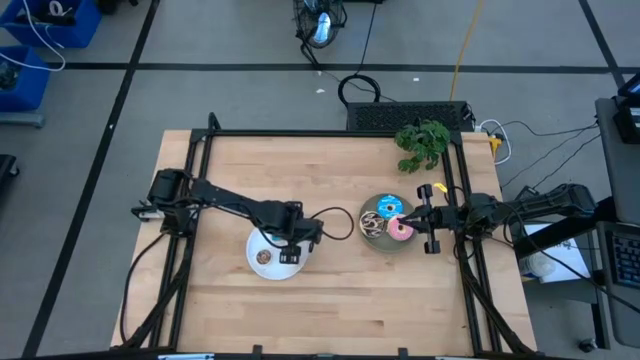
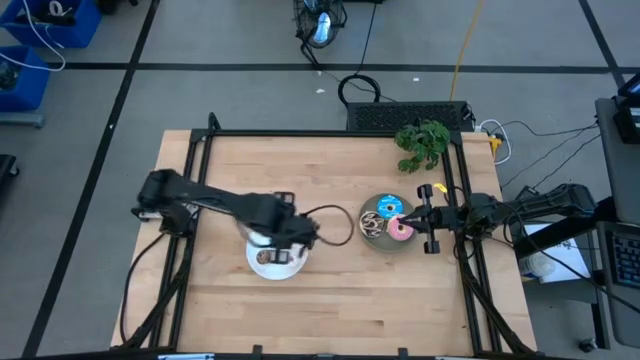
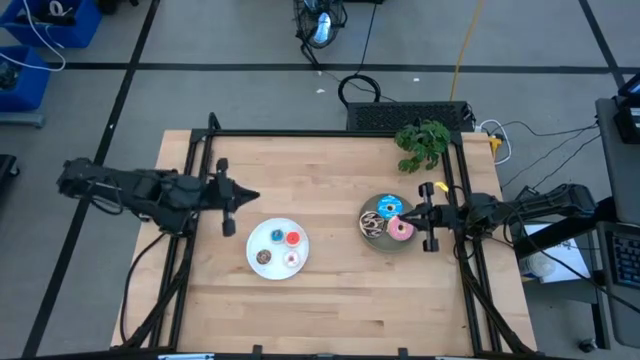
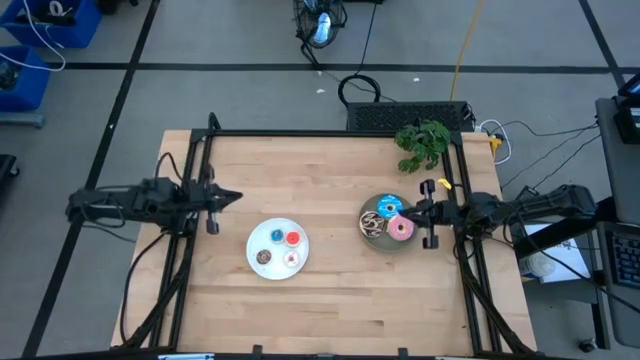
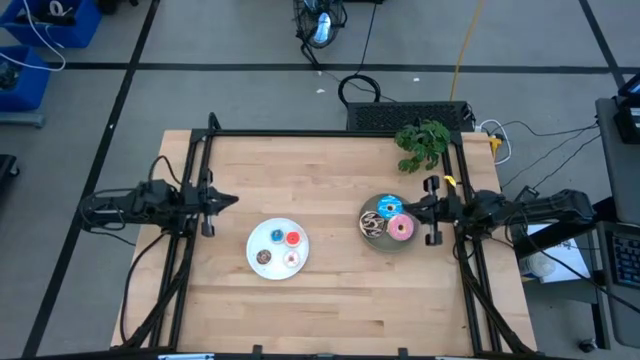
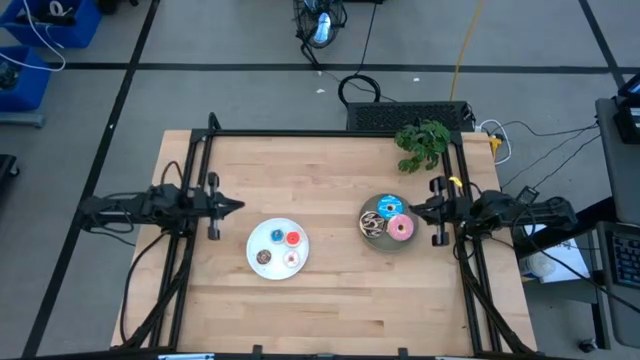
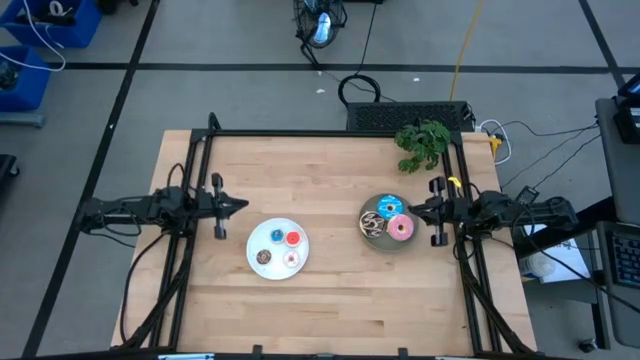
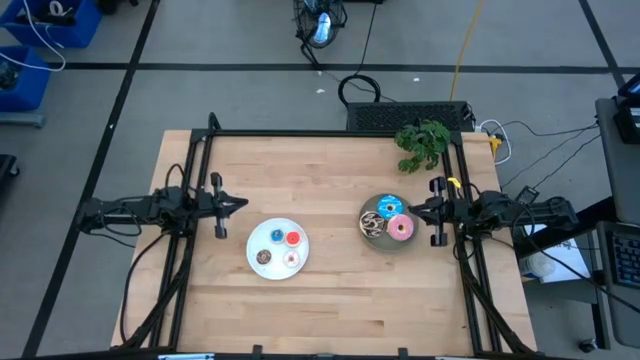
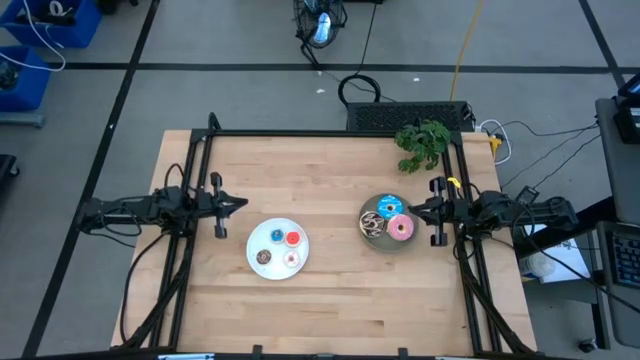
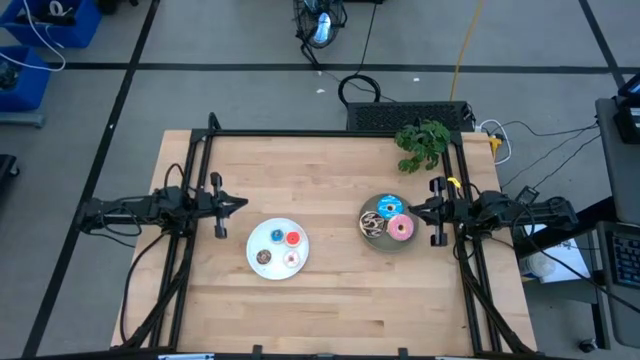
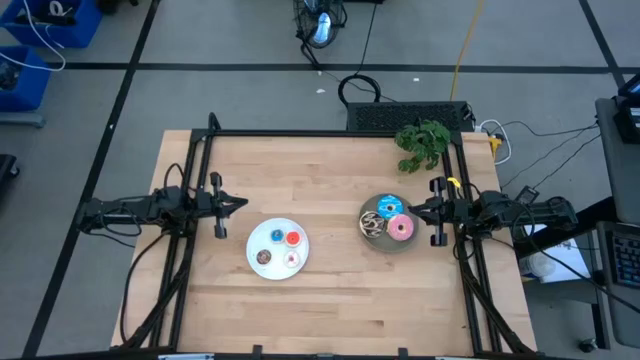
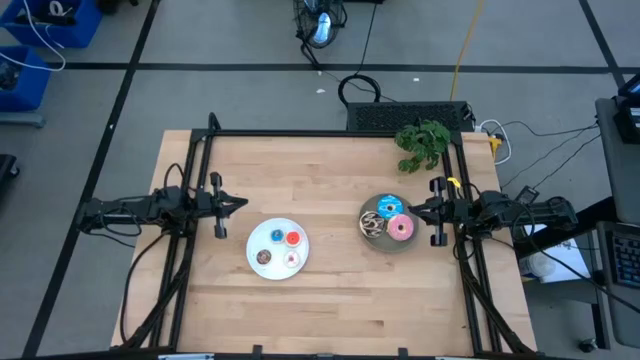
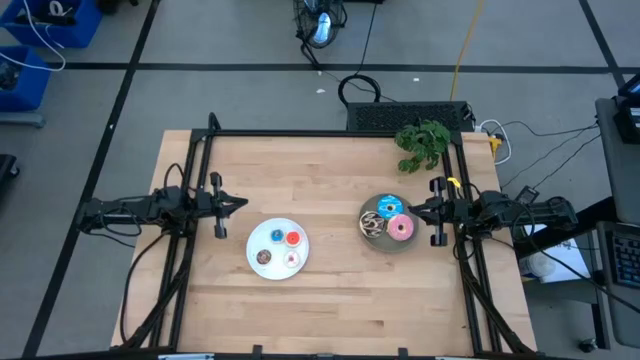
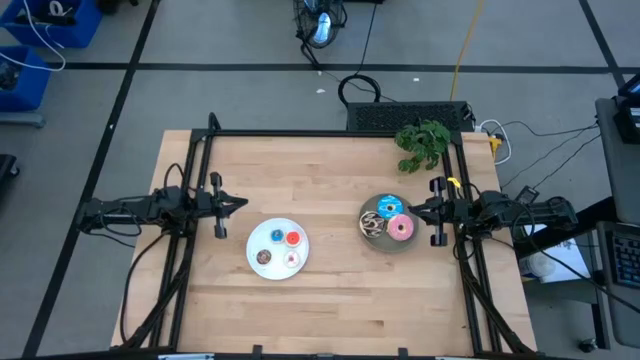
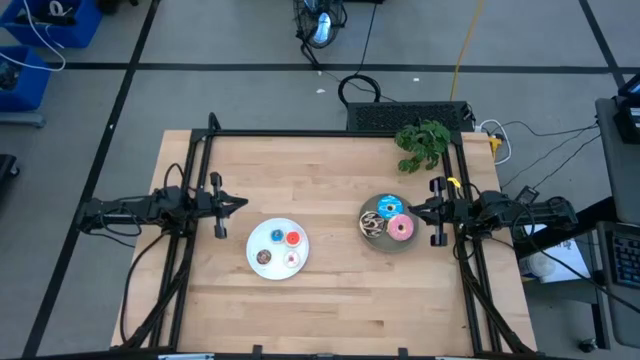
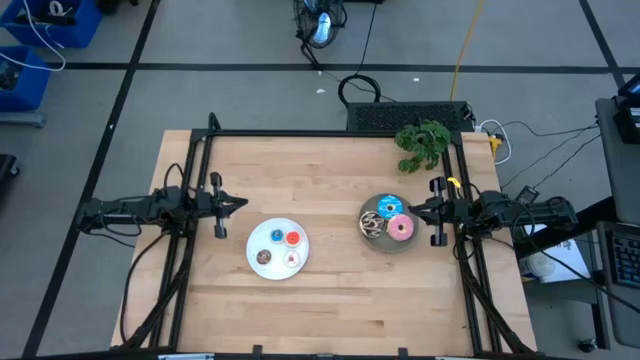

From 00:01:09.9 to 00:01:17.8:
Task: Pick & Place donuts
Return to Home Position

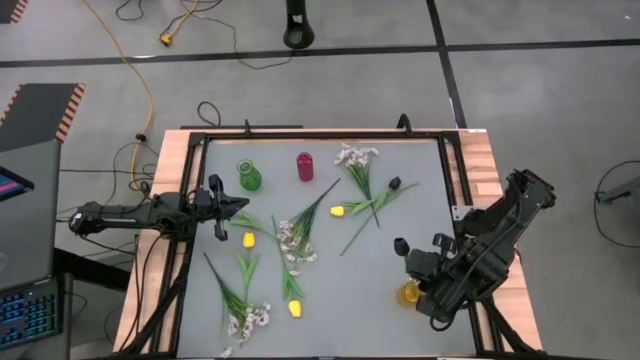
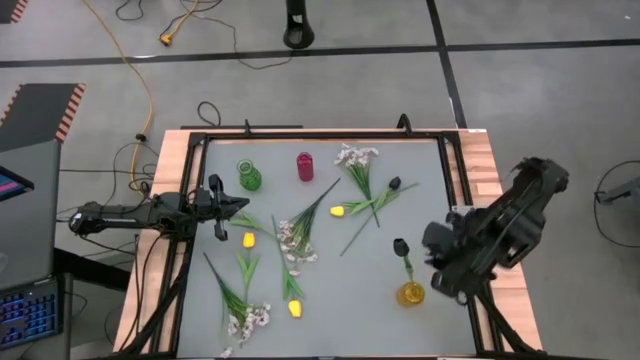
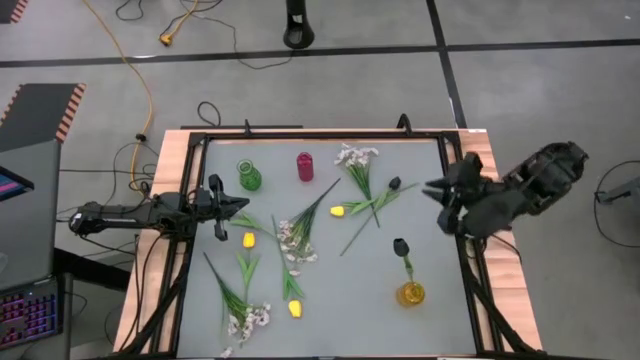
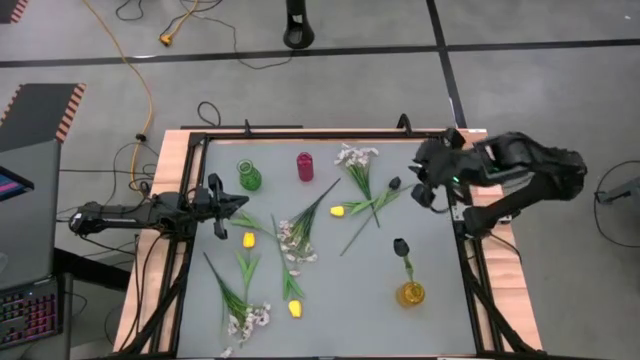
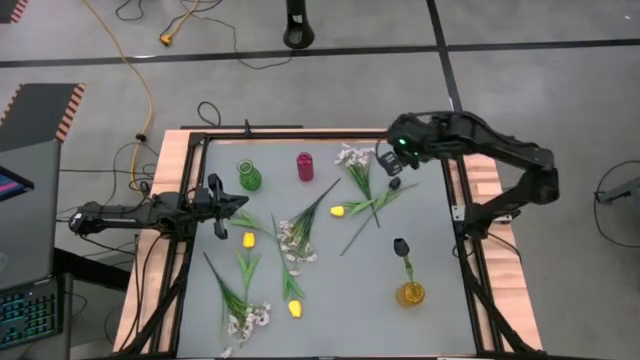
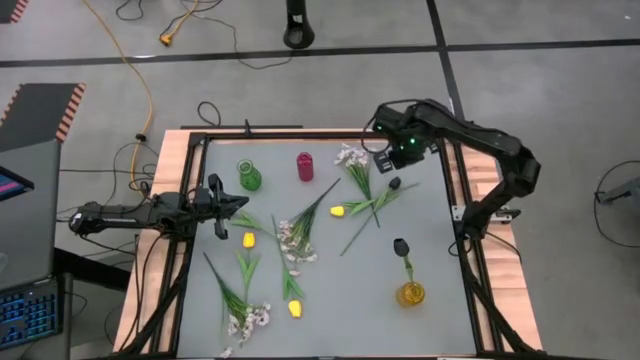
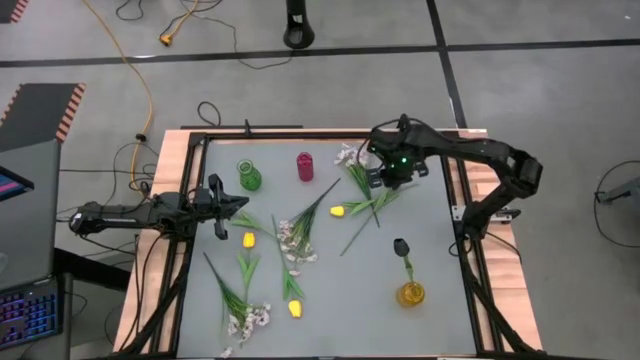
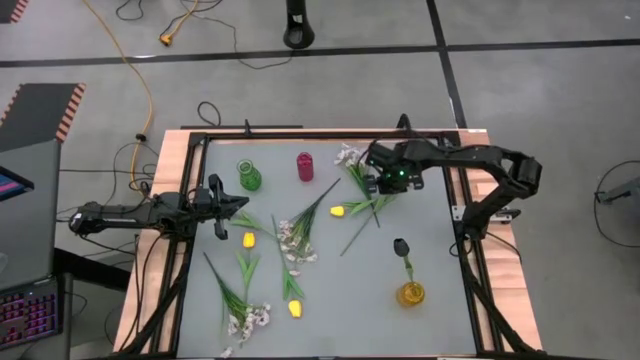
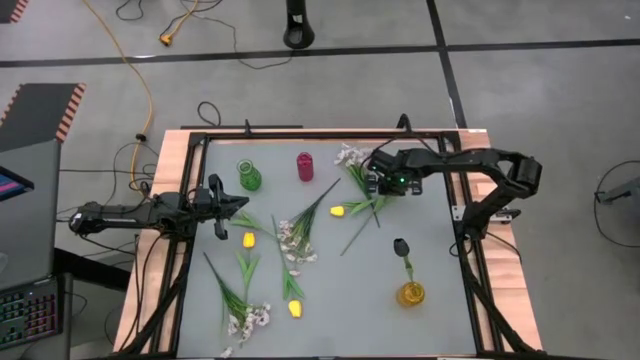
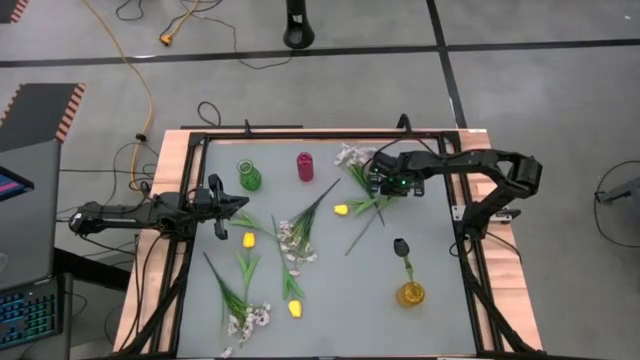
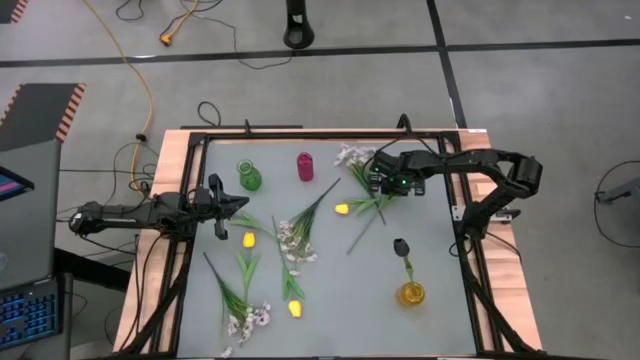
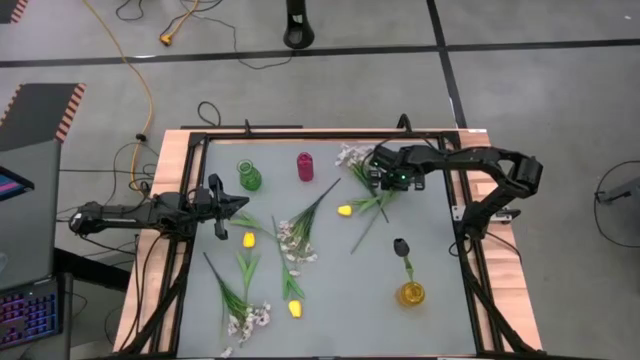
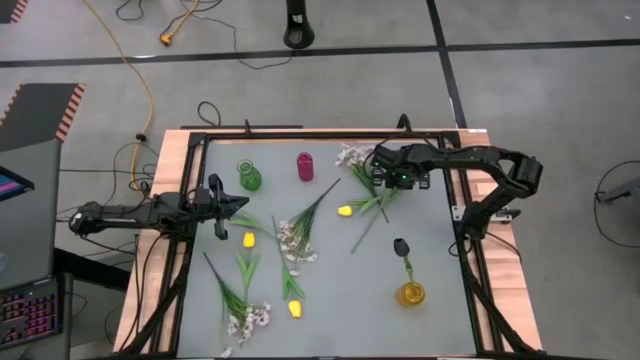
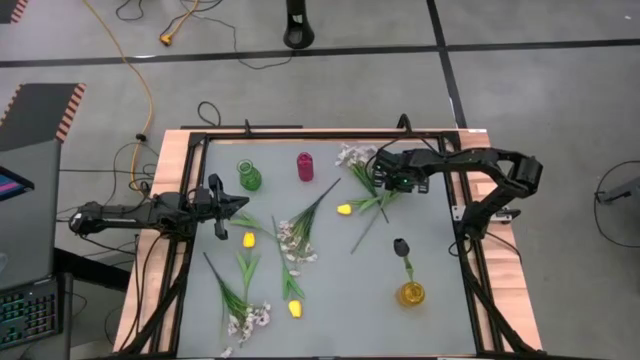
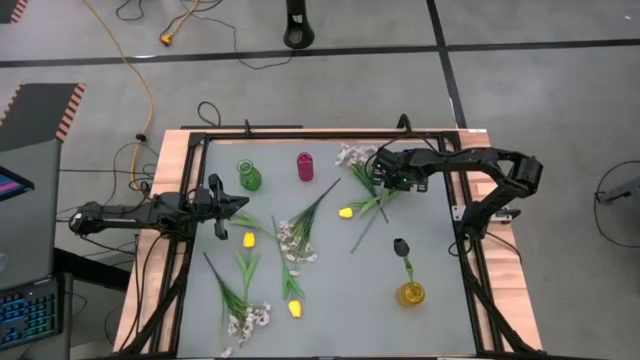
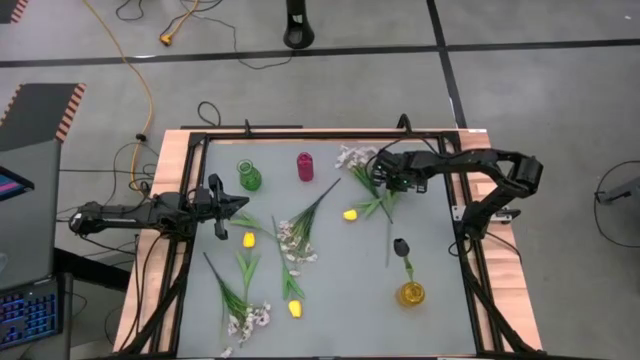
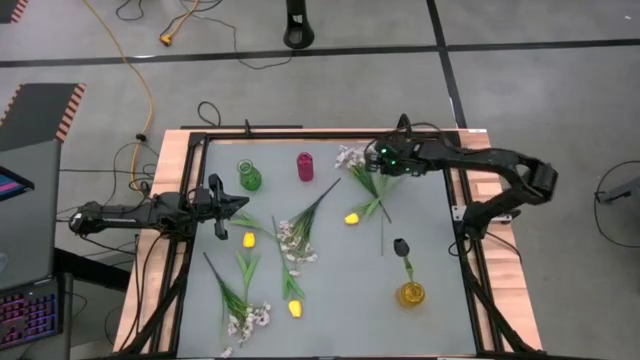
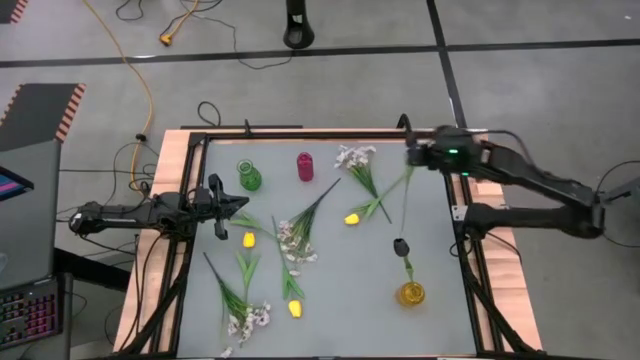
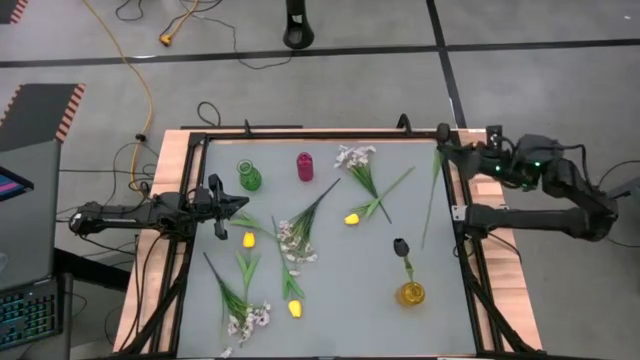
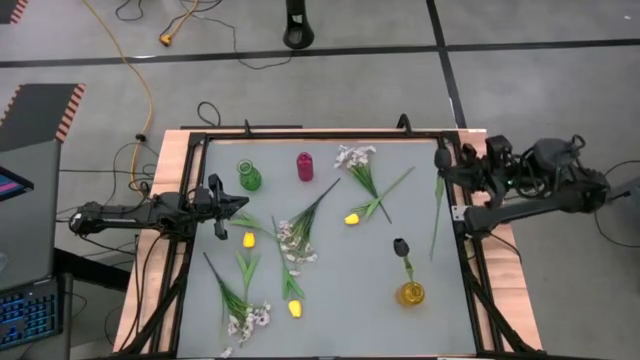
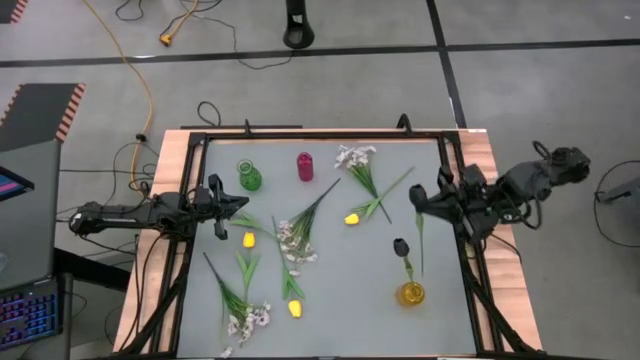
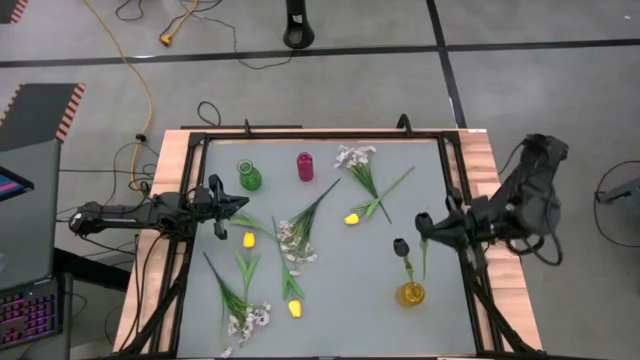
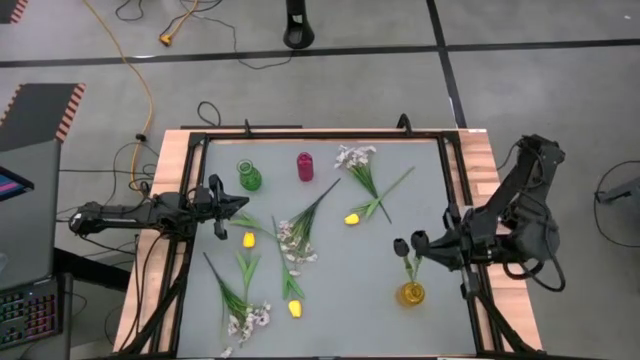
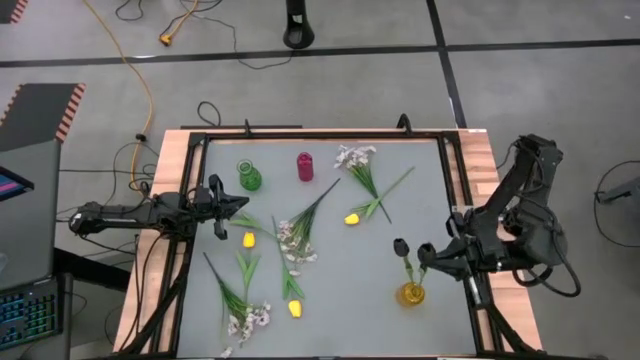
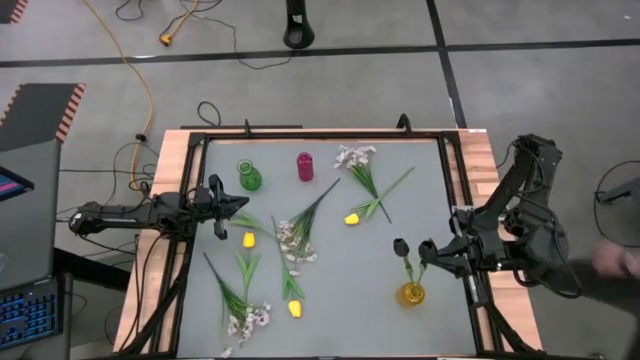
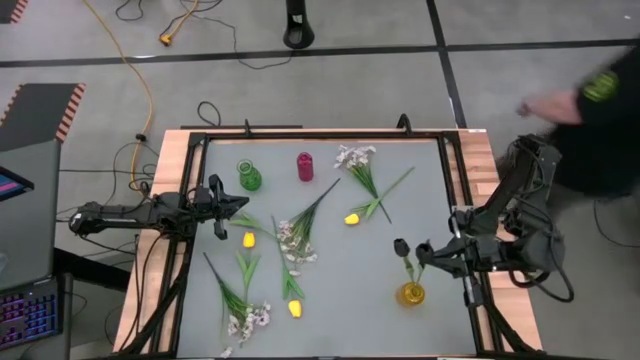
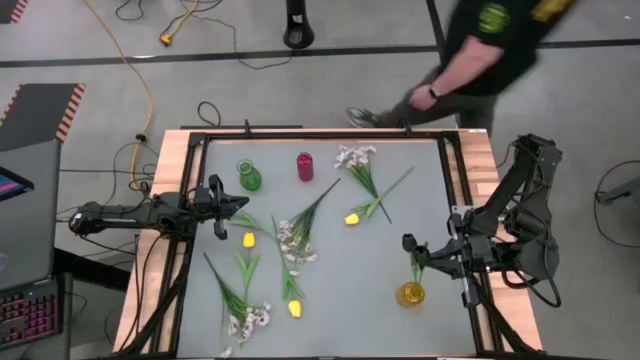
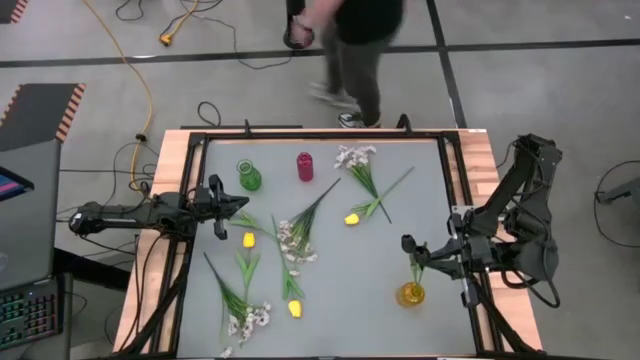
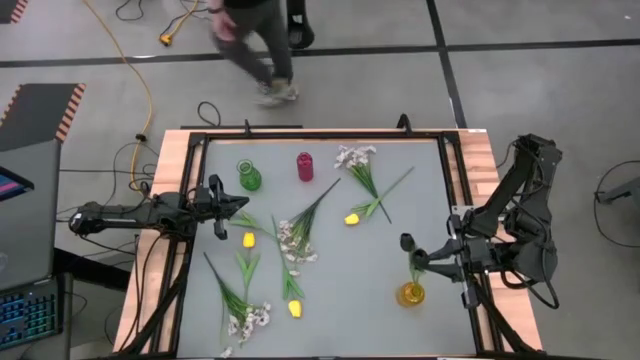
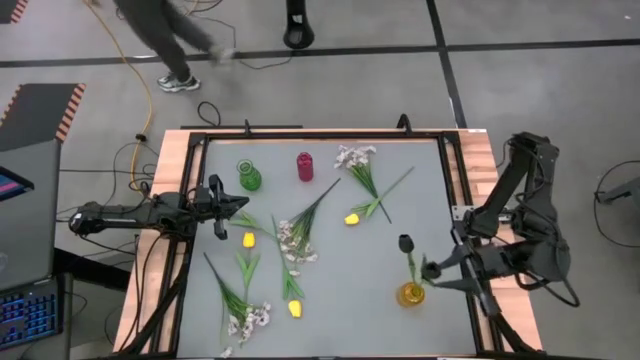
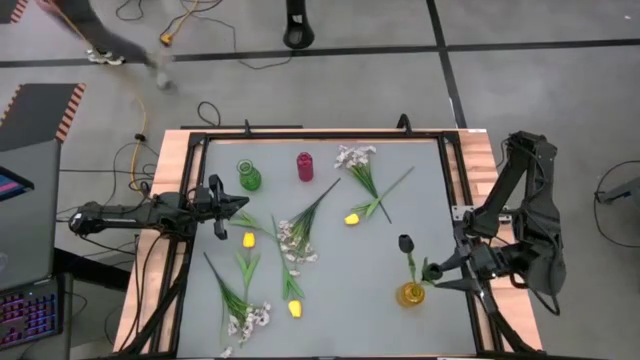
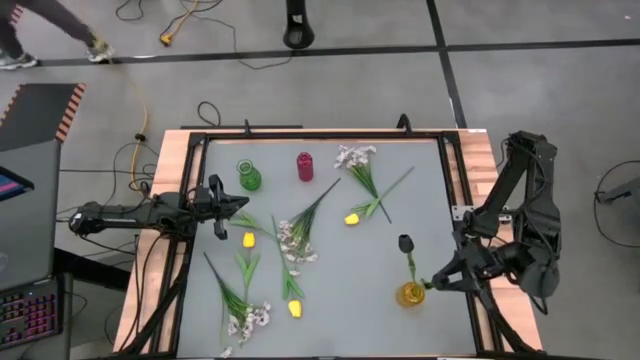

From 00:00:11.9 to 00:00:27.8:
Task: Sort flowers into vase by color
Put the right black tulip into the yellow vase
